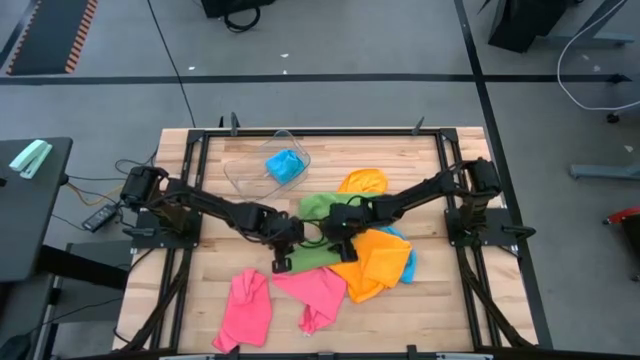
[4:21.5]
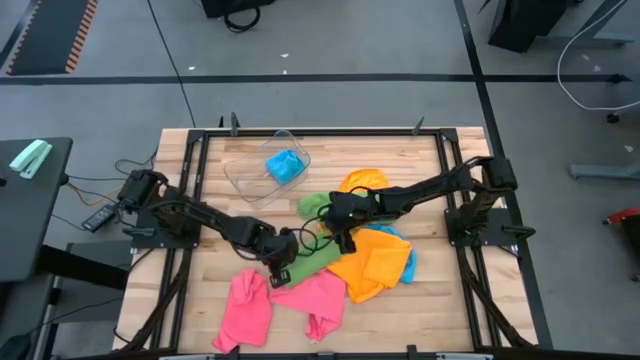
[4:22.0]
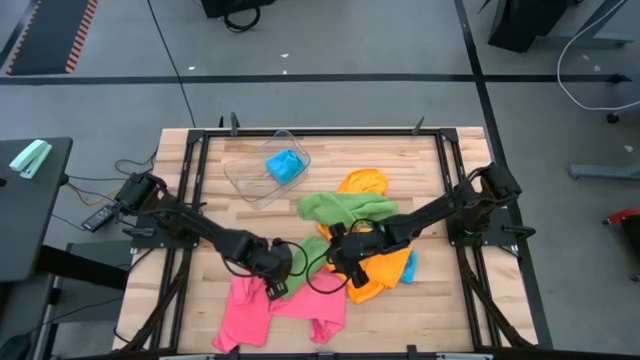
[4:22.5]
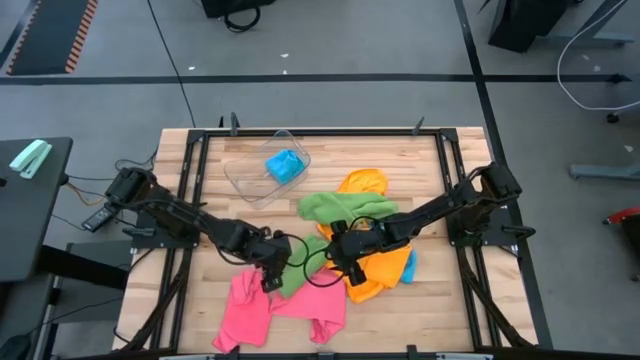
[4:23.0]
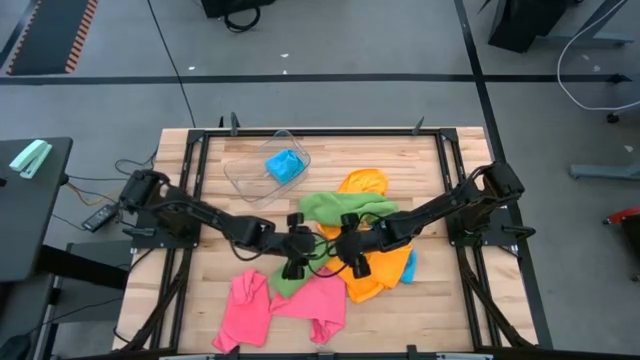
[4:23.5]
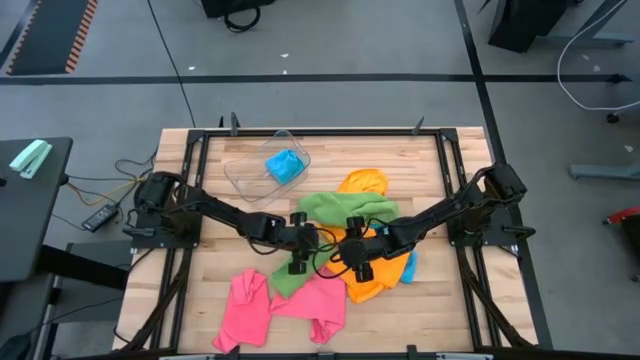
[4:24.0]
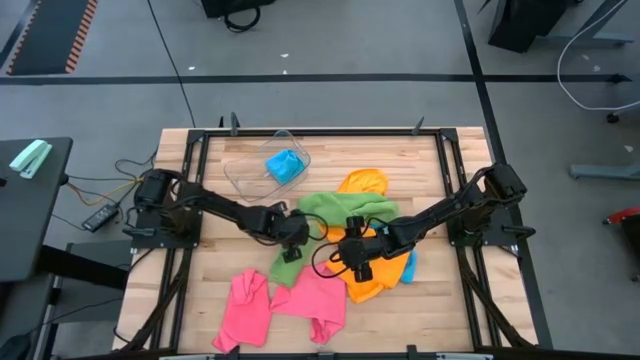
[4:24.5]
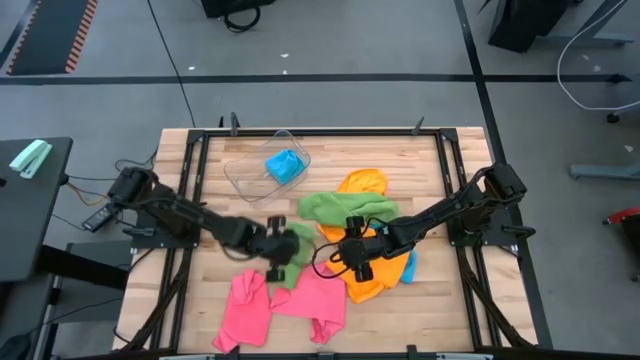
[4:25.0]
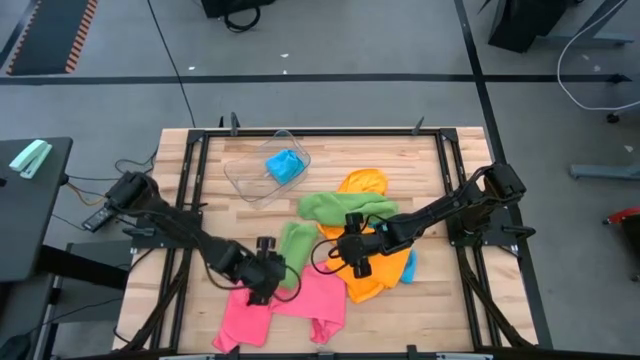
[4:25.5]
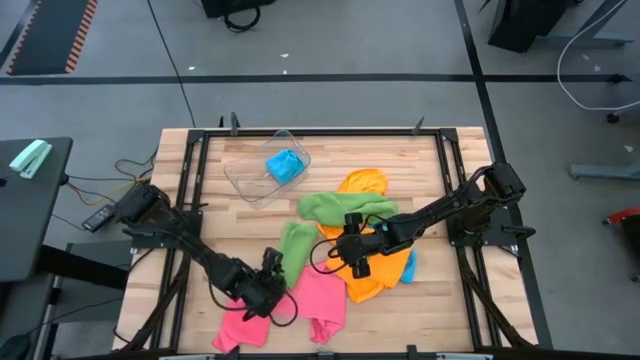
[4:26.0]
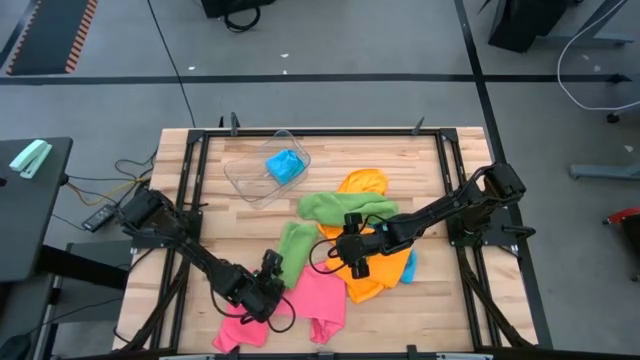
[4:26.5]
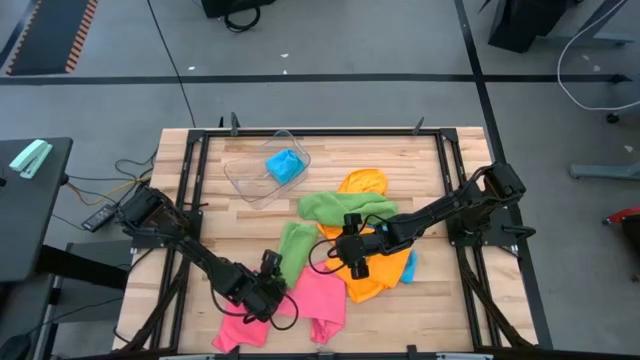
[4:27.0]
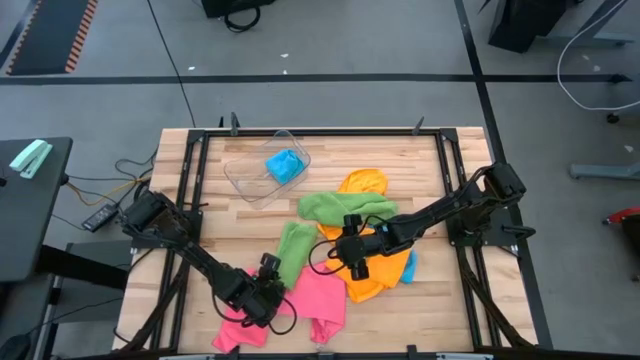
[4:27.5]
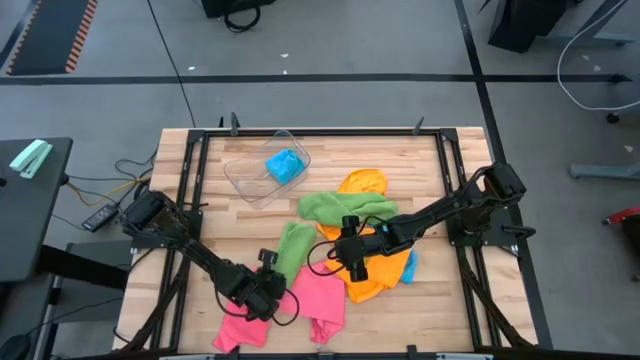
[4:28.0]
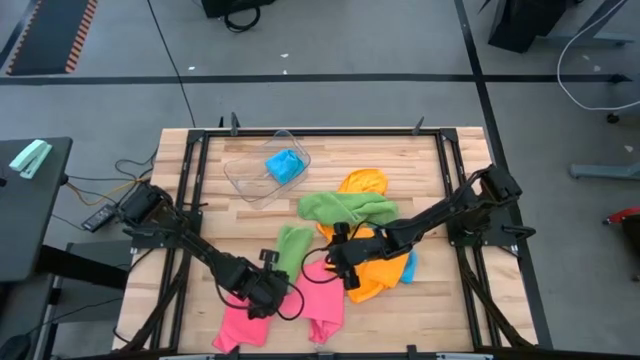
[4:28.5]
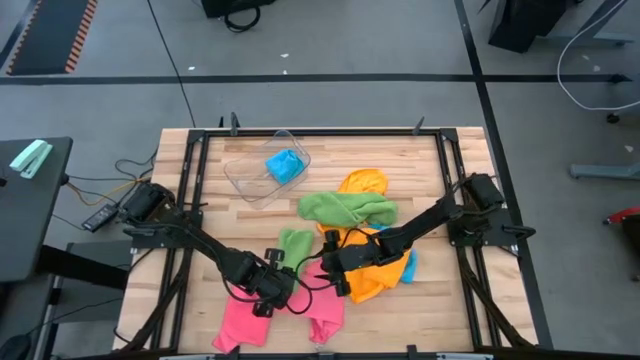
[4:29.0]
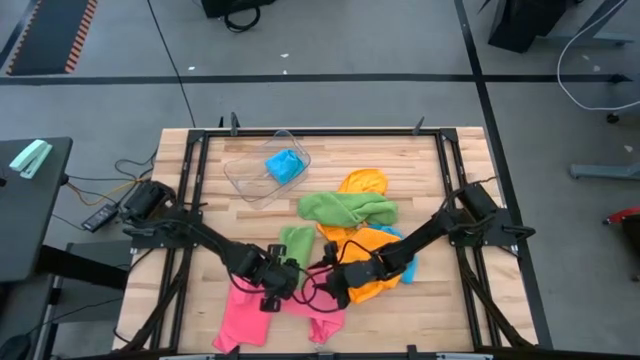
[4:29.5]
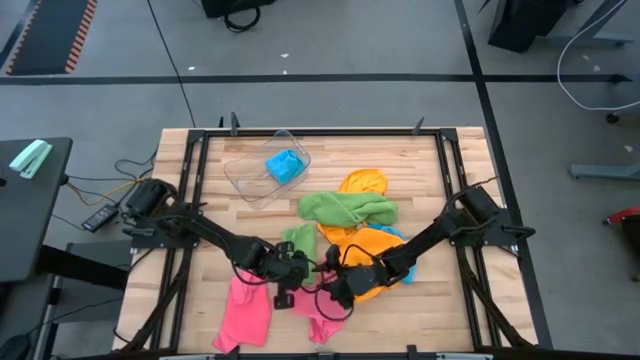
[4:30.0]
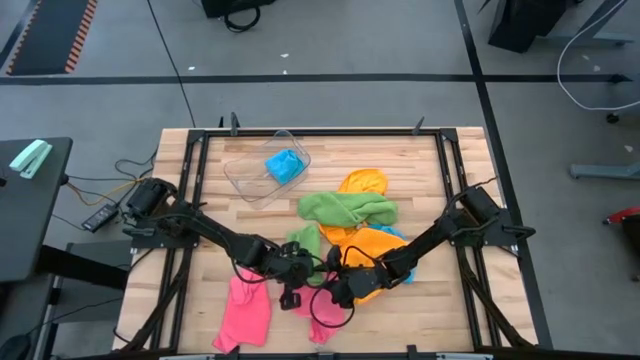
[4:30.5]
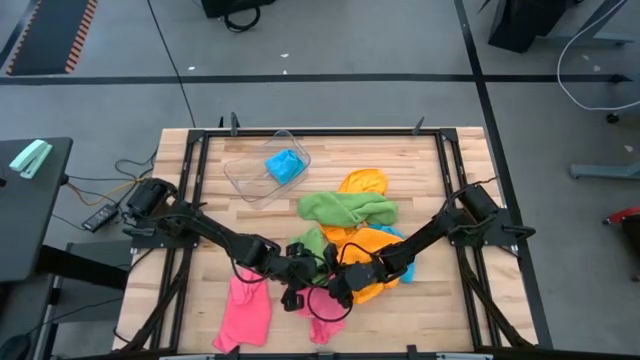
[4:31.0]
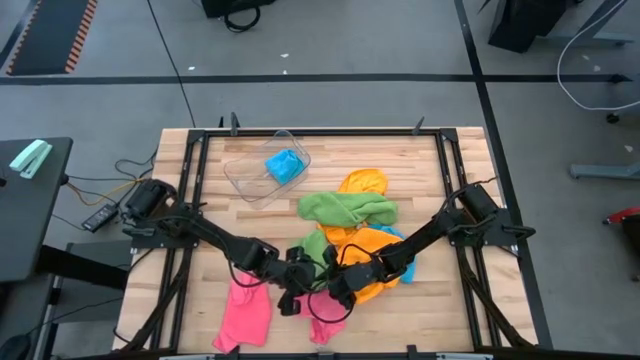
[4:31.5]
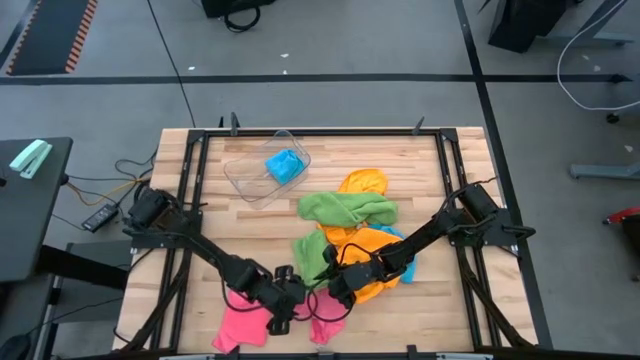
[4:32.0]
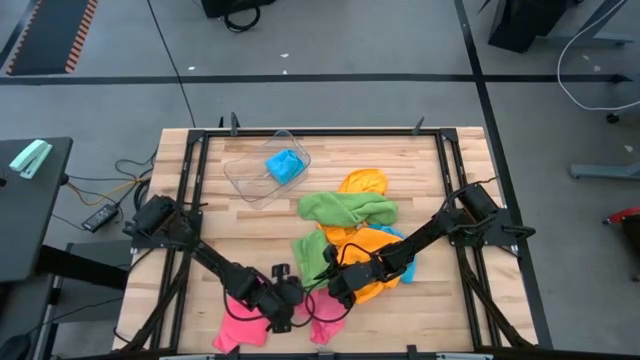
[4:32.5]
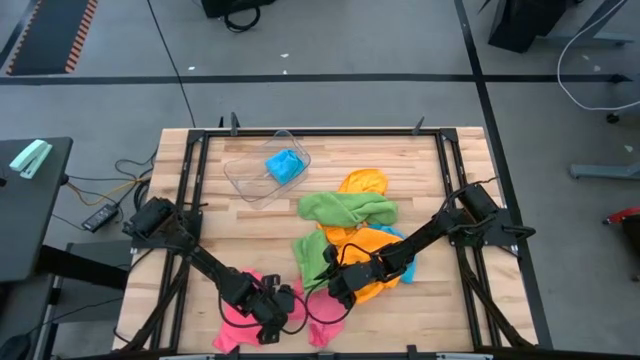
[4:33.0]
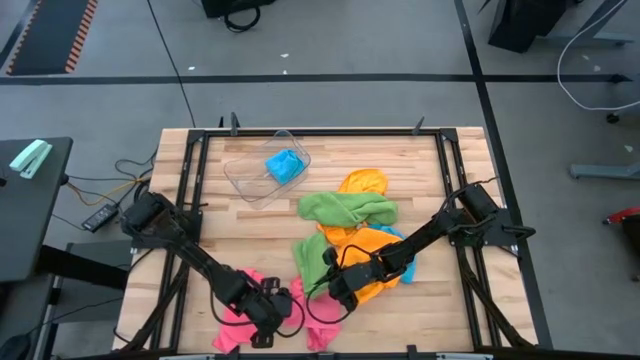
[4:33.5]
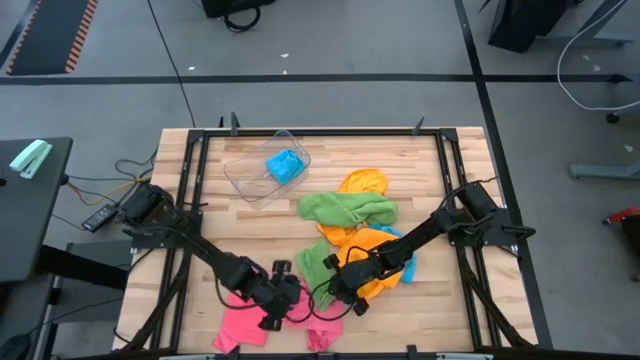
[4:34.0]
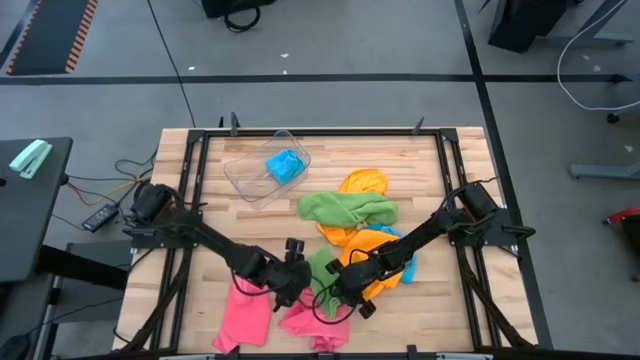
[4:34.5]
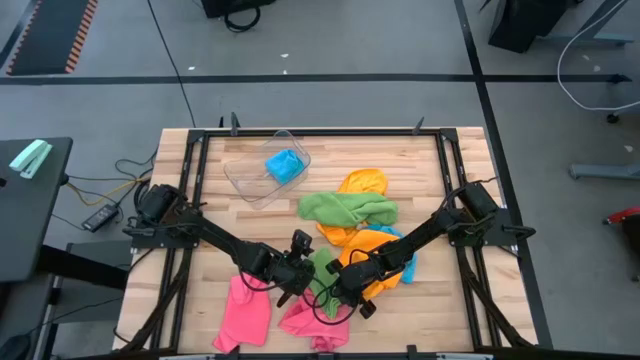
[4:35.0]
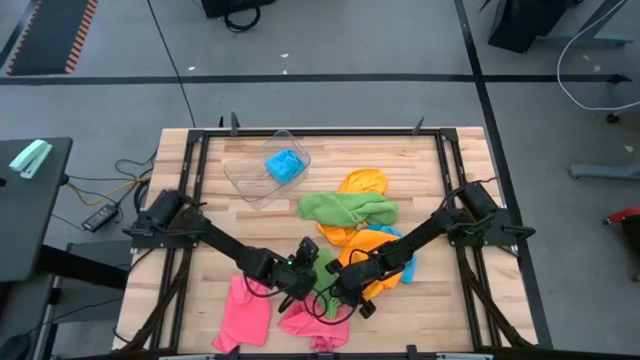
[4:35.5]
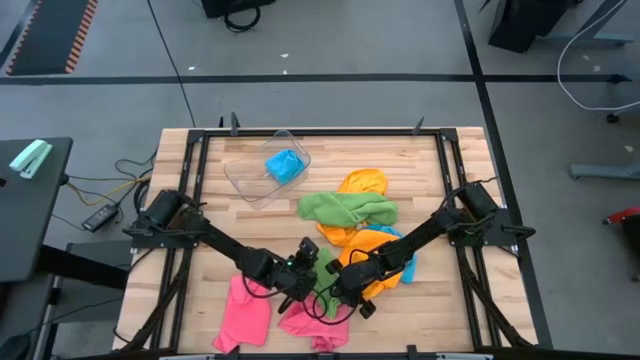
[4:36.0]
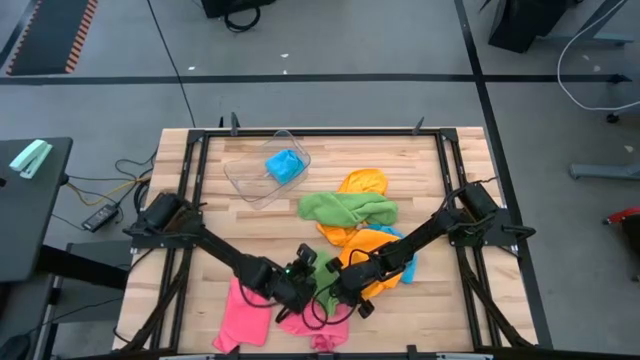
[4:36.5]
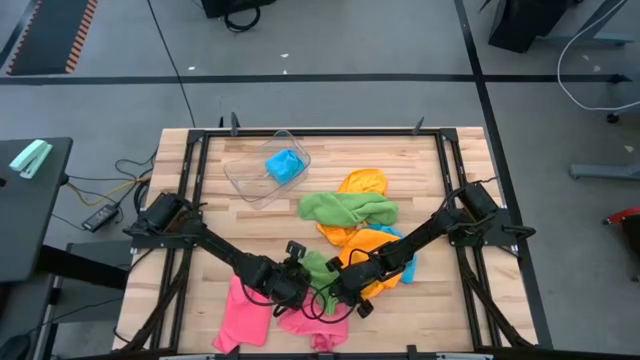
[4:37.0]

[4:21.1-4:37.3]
Task: Fold microfiber towels
Fold the left green microfiber towel

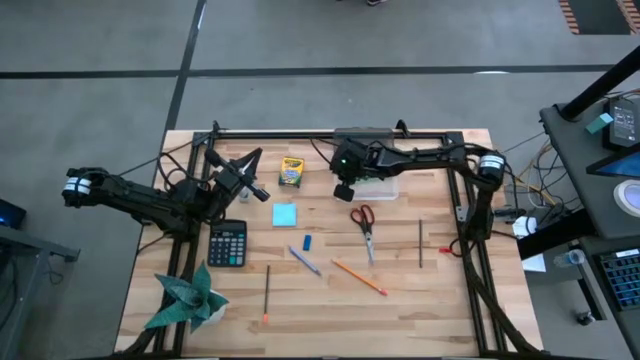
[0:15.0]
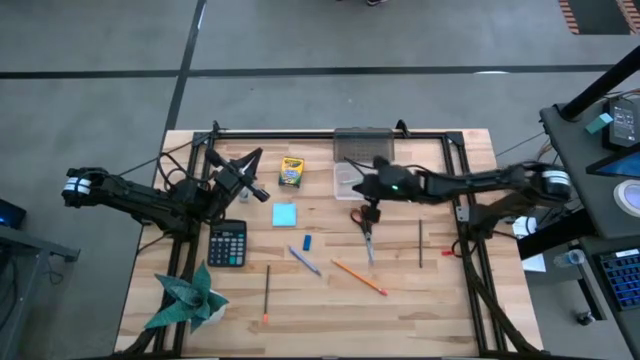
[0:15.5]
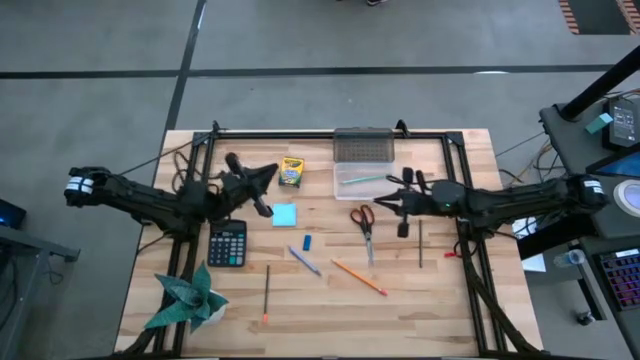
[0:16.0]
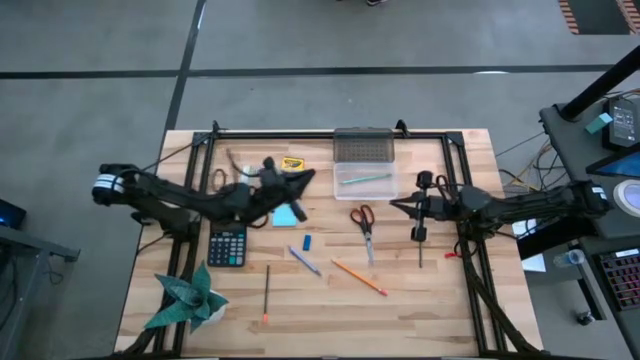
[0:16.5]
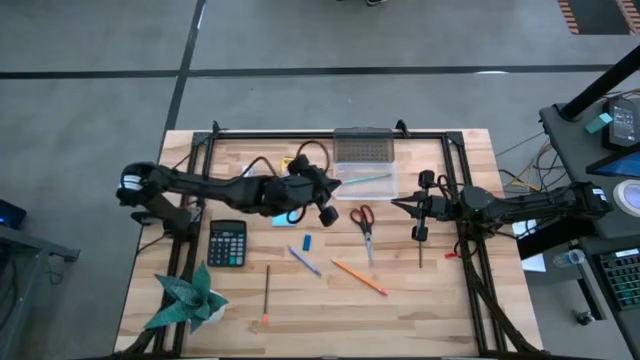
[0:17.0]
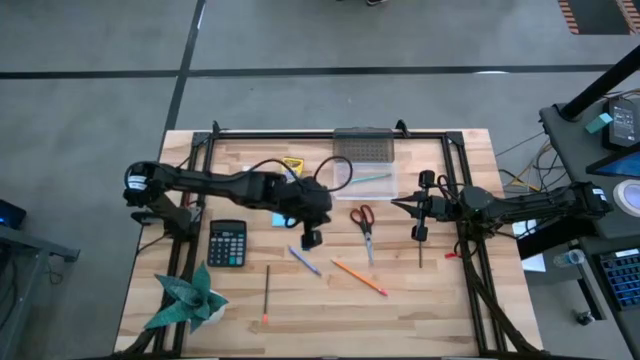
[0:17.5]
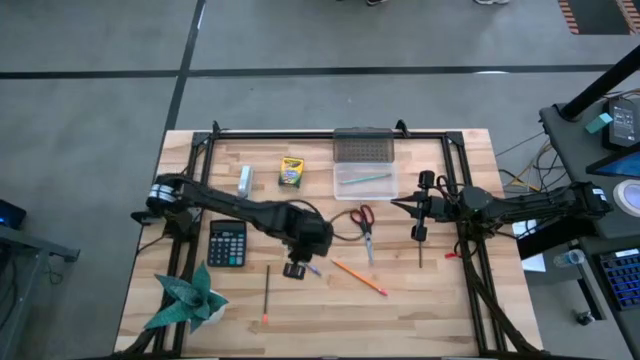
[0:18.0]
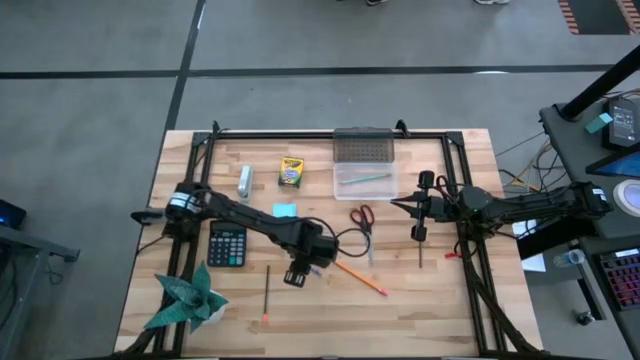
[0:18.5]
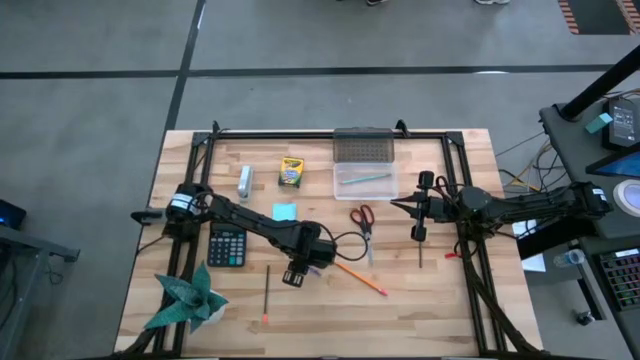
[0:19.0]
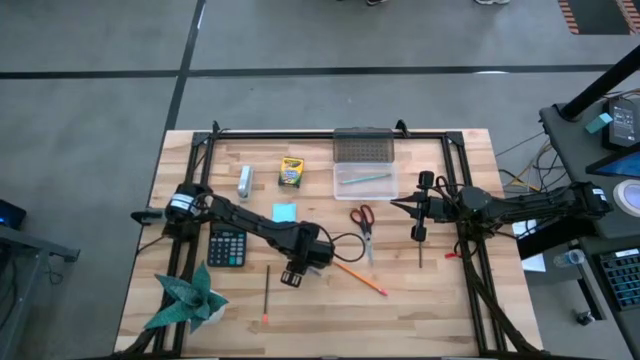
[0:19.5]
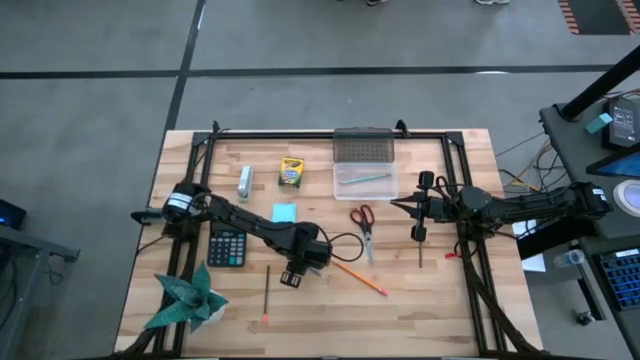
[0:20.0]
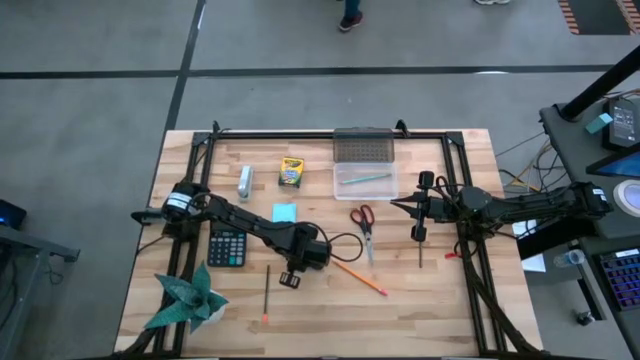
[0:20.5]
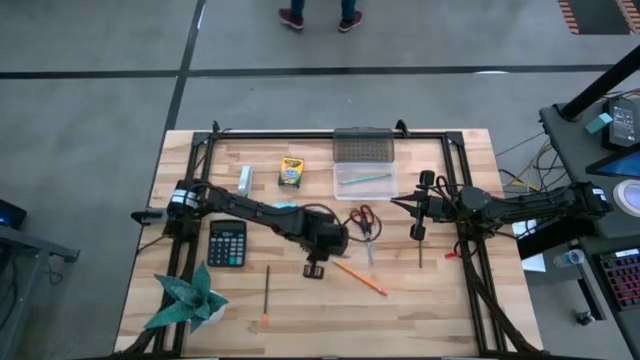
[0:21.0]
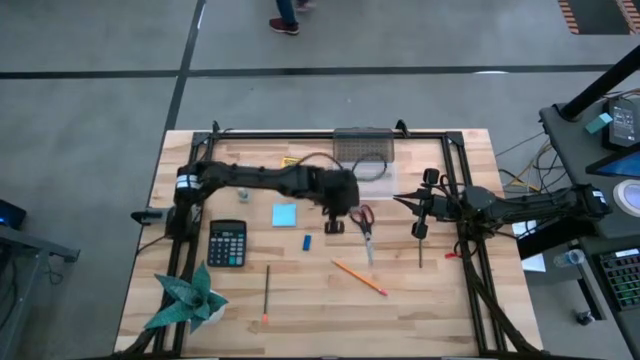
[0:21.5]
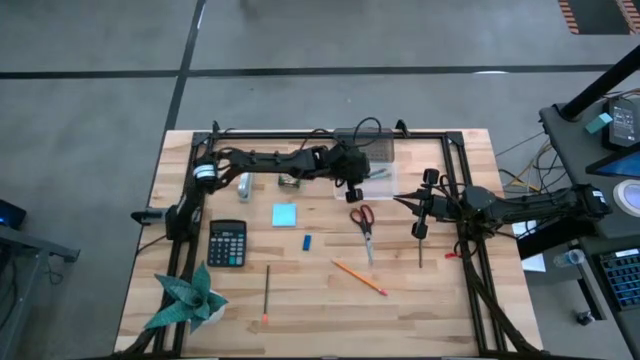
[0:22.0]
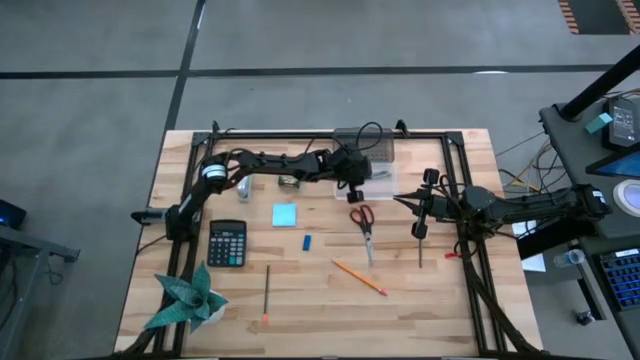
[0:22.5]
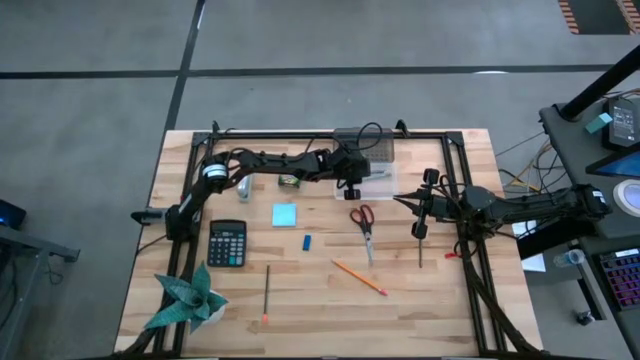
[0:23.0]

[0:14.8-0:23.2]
Task: Pack school essentials
Put the gray pen into the transparent supply box
